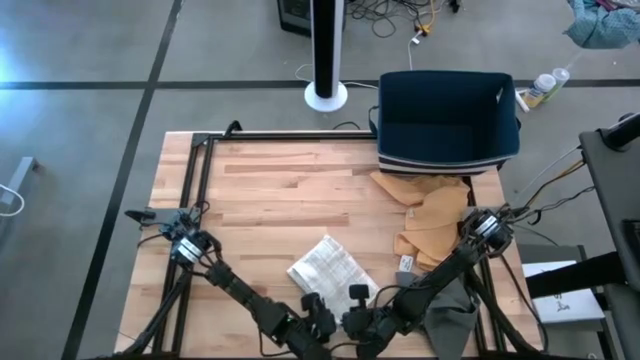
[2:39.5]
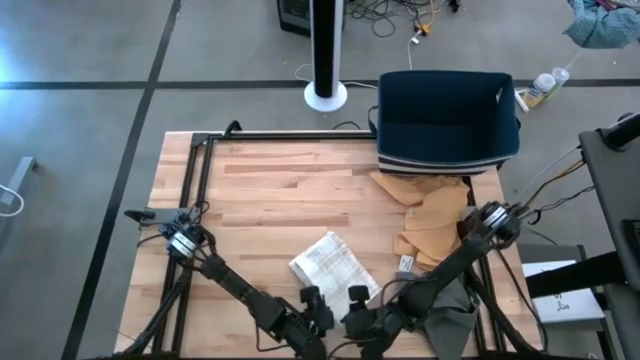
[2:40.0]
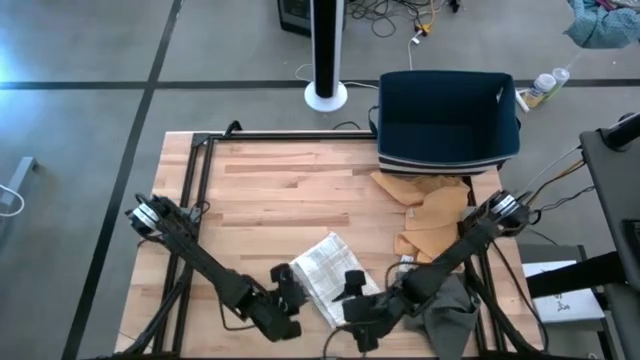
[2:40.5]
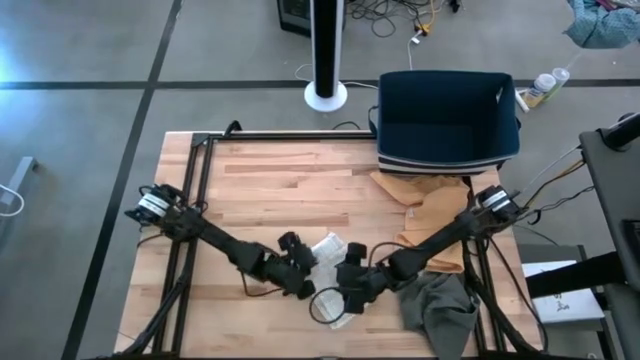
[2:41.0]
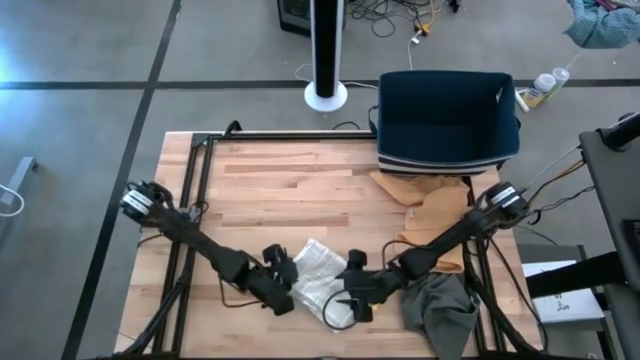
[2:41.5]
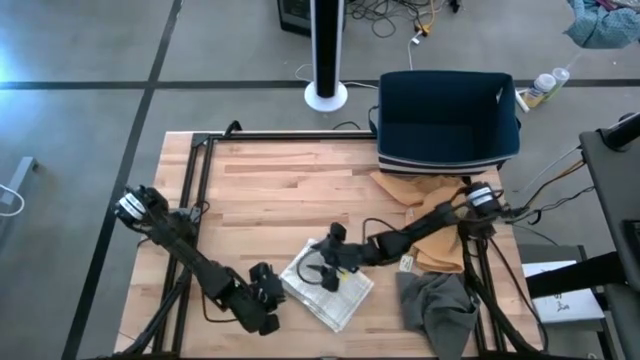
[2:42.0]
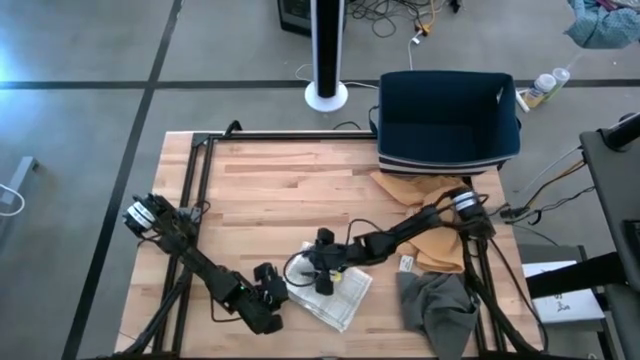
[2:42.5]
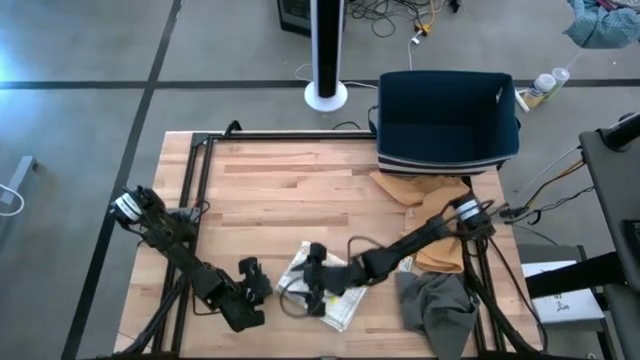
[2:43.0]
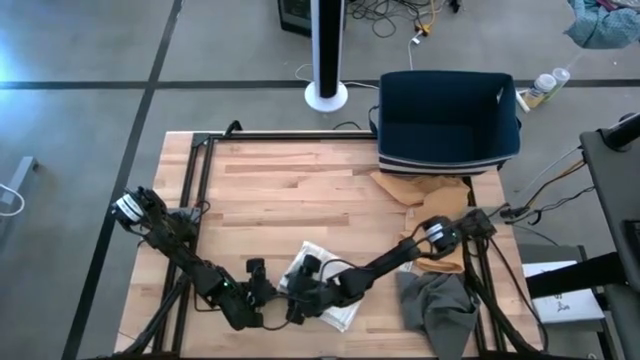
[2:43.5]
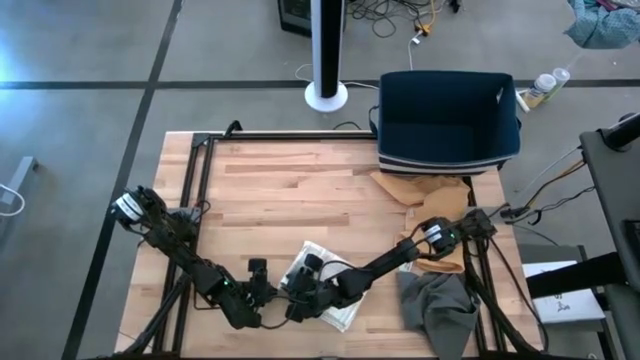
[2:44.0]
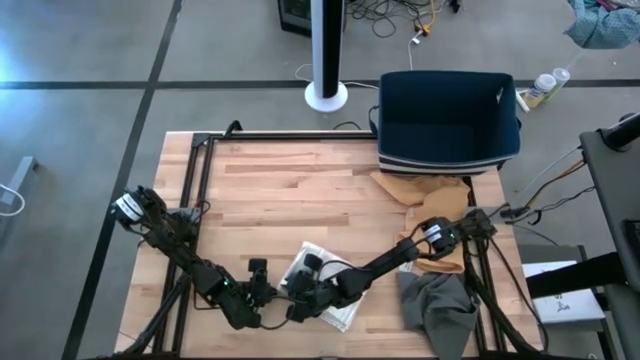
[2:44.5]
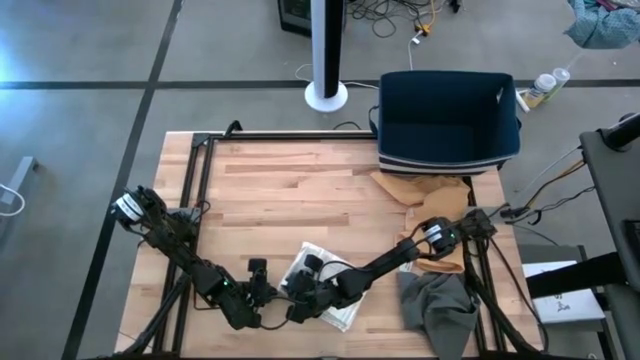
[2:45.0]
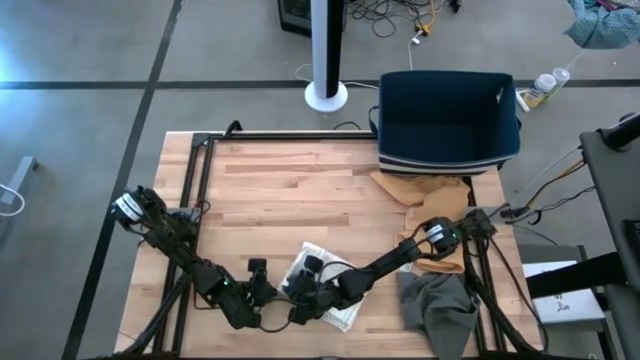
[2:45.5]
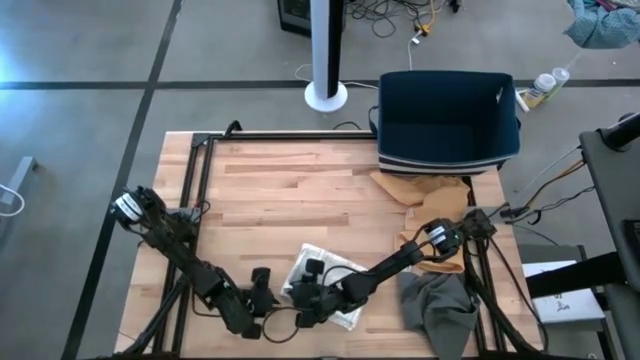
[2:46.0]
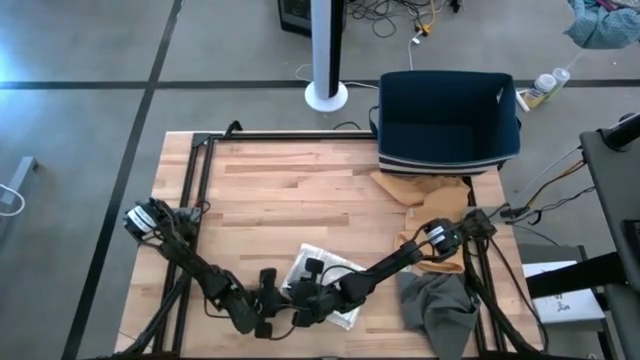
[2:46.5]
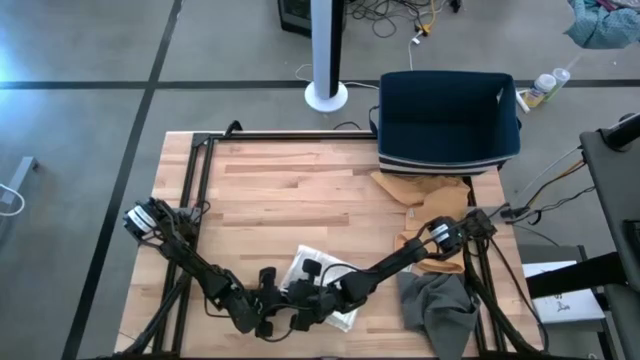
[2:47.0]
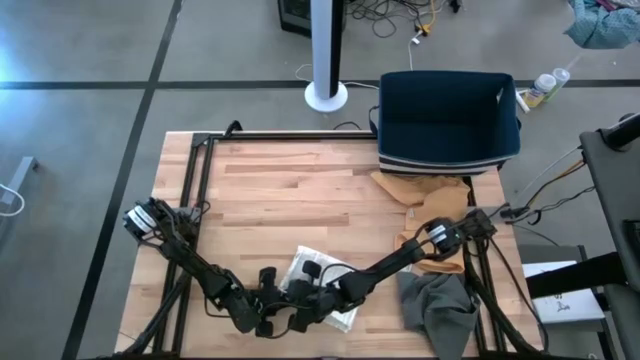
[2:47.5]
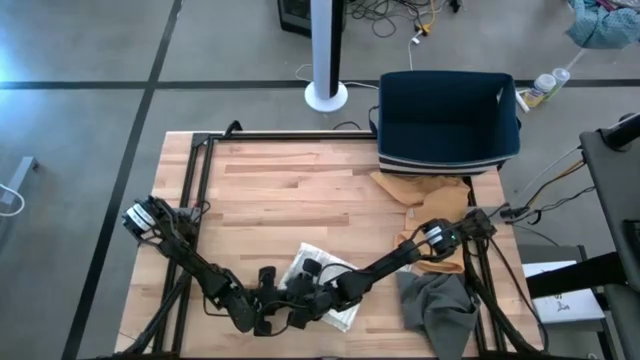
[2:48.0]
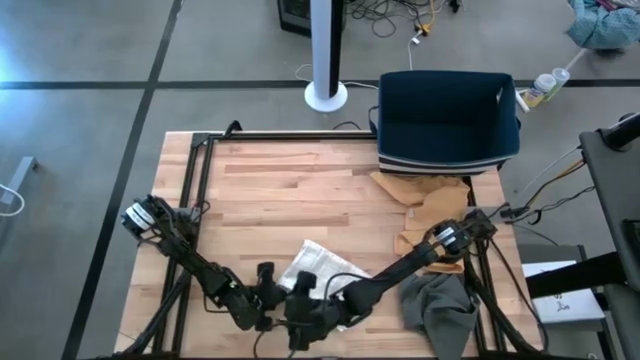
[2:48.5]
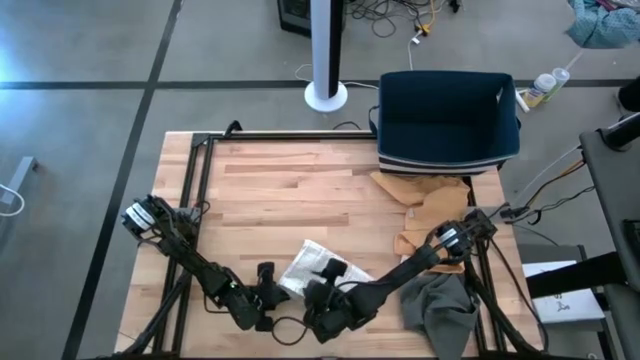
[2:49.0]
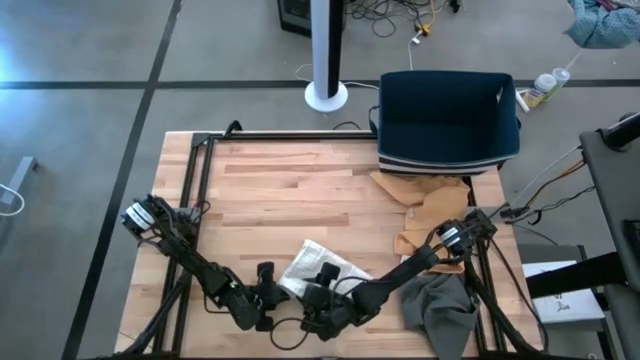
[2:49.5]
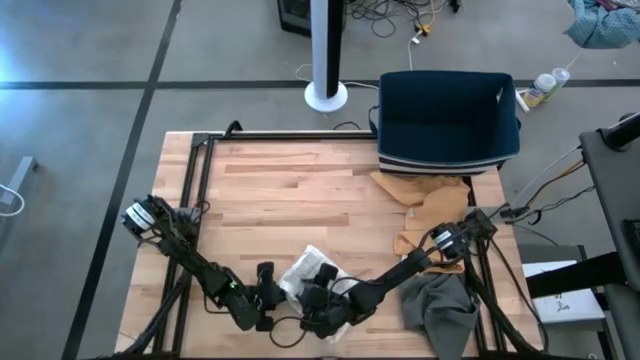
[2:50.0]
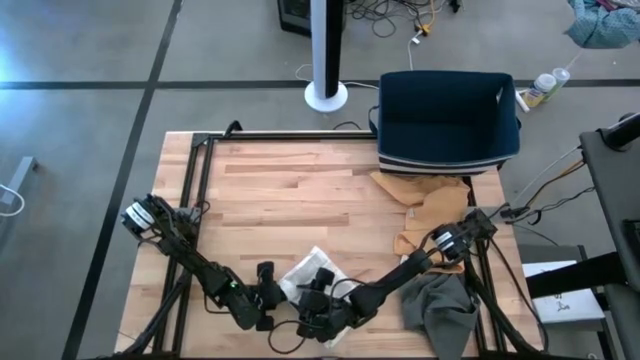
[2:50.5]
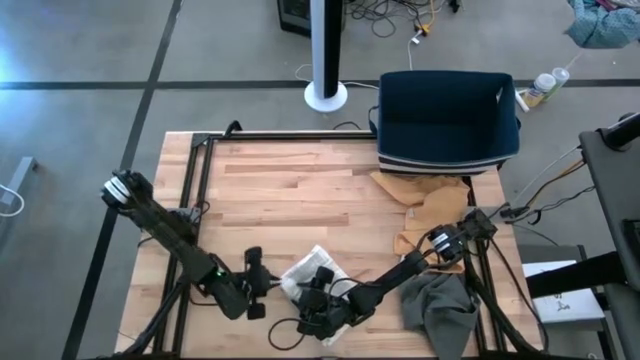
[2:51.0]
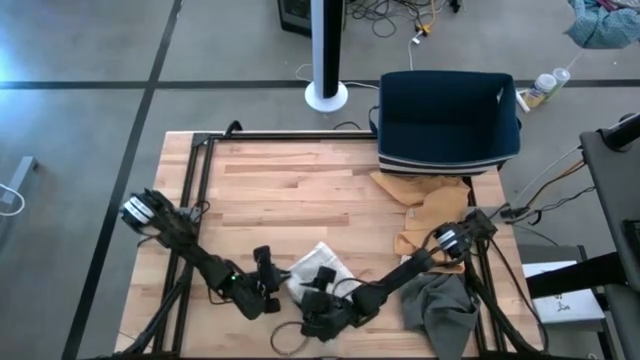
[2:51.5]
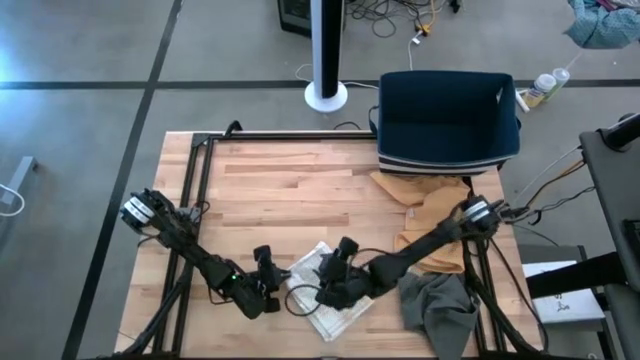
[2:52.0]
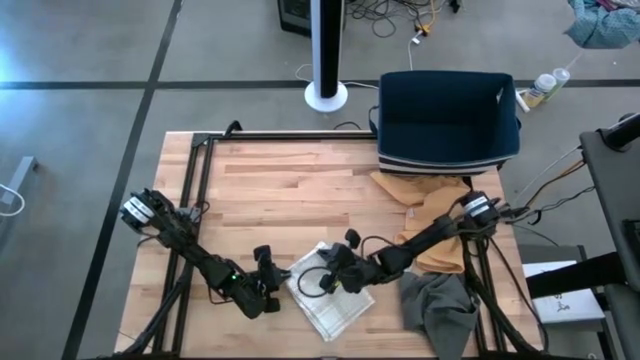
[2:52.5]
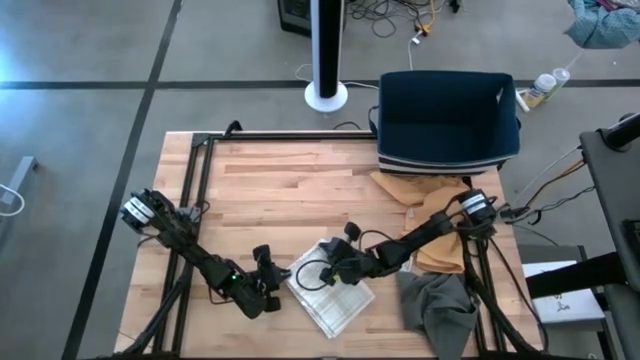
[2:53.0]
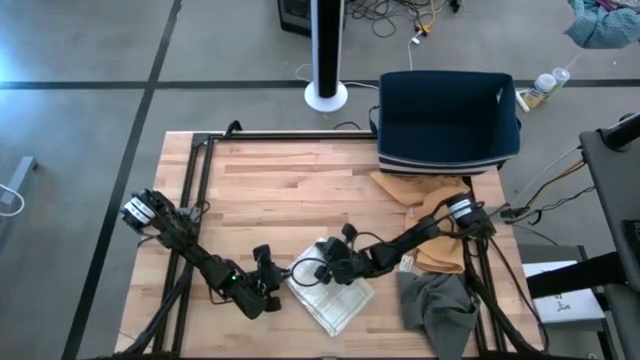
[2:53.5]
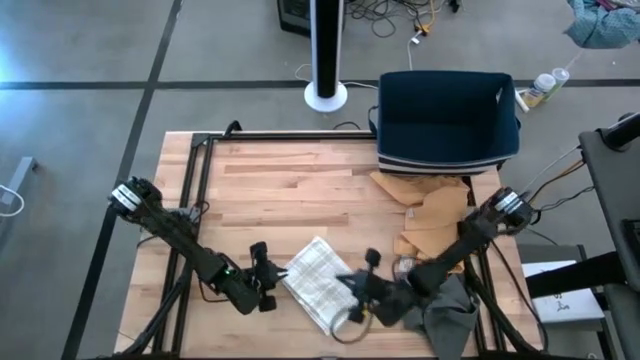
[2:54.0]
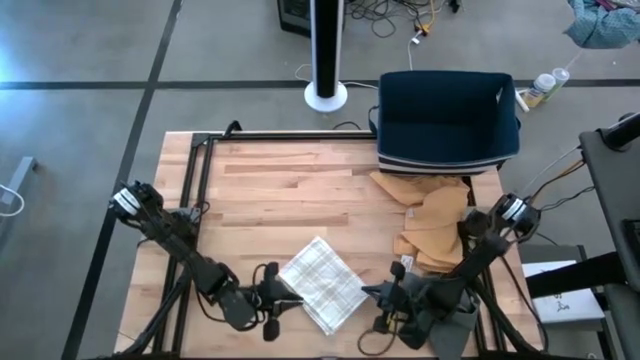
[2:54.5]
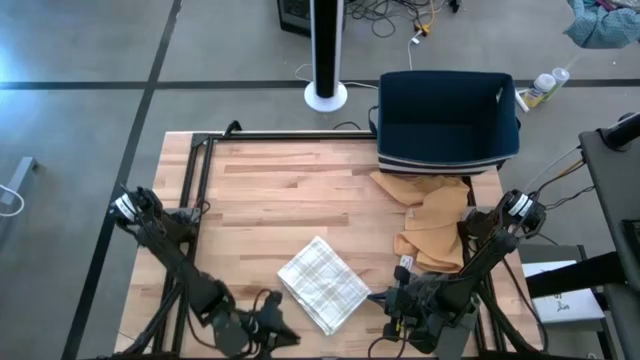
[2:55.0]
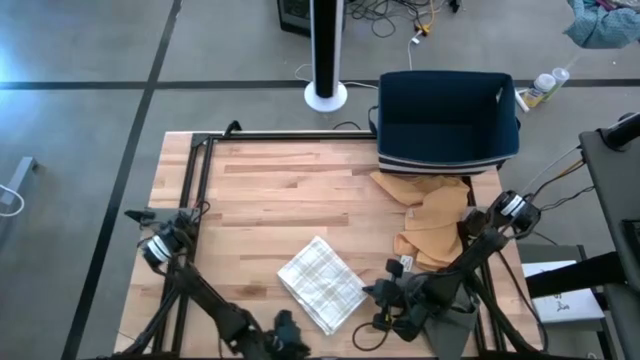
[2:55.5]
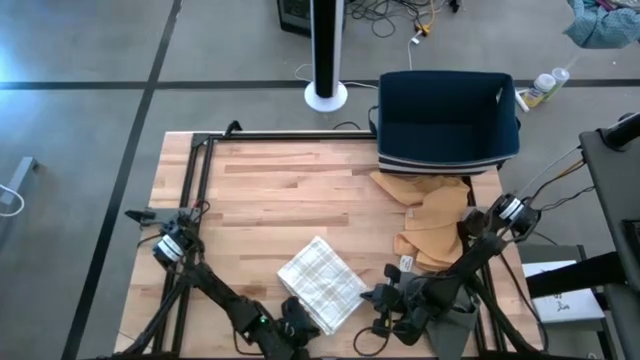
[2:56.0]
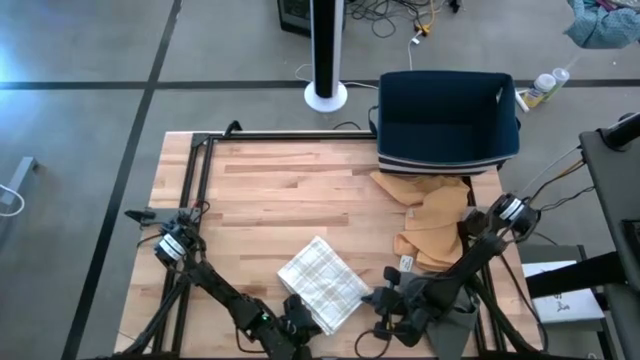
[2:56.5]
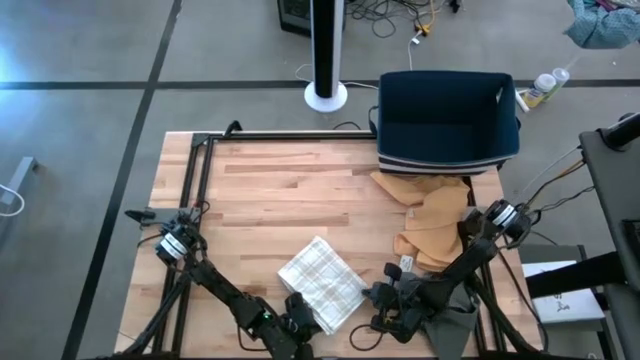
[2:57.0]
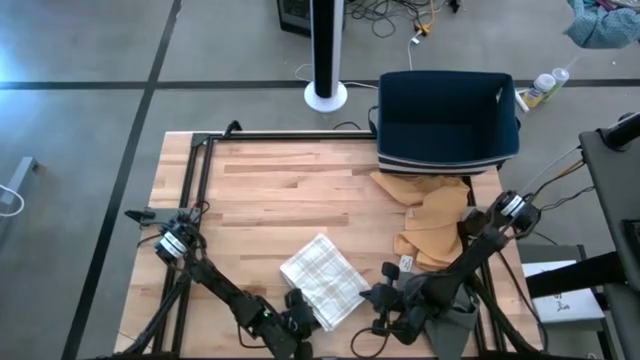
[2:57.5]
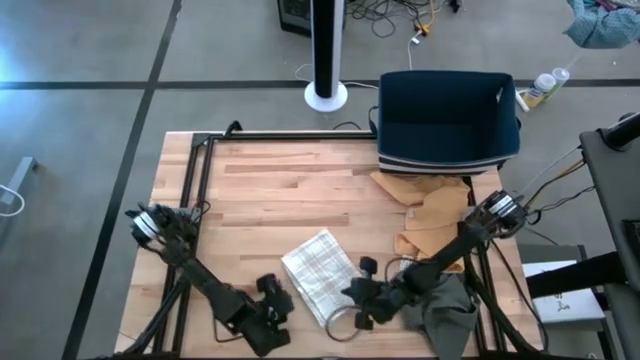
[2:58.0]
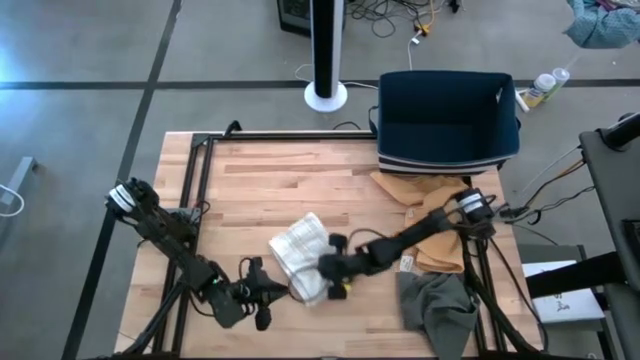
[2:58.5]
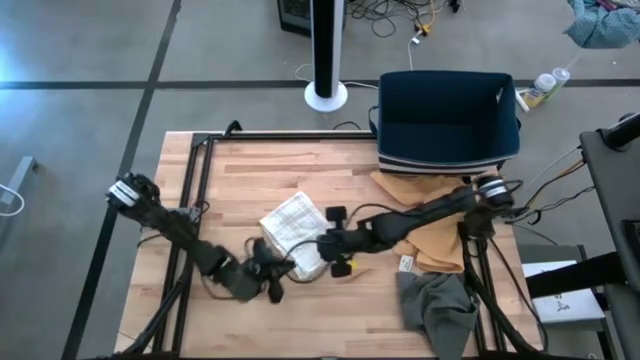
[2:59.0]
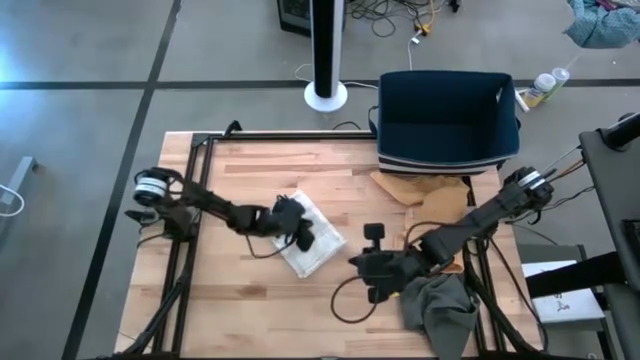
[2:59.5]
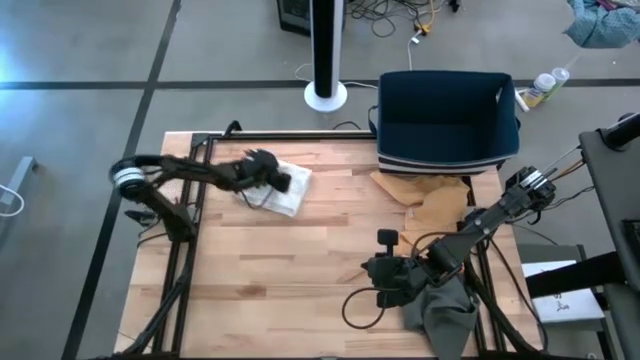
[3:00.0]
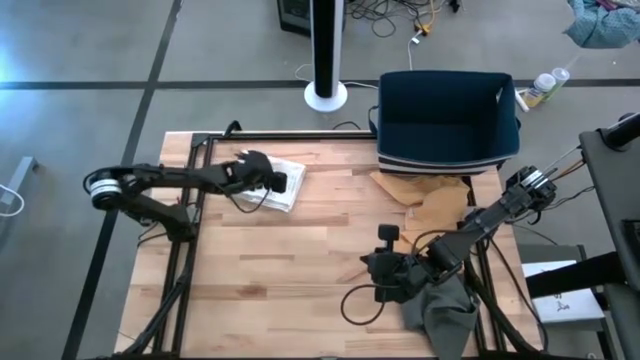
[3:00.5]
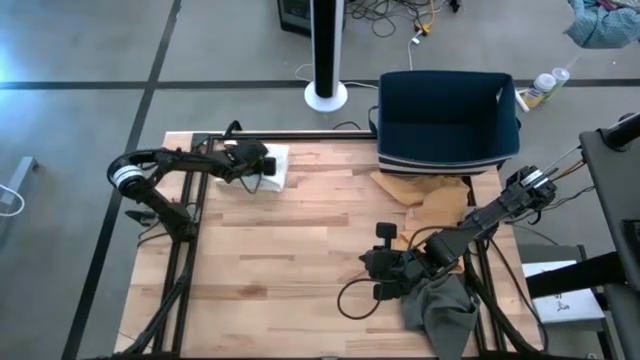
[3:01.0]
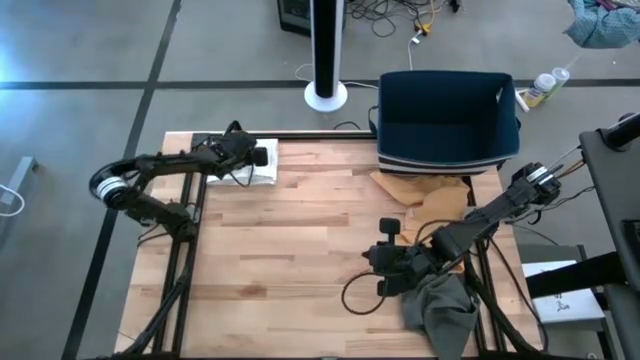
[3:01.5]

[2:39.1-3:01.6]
Task: Fold towel
Fold the white towel
